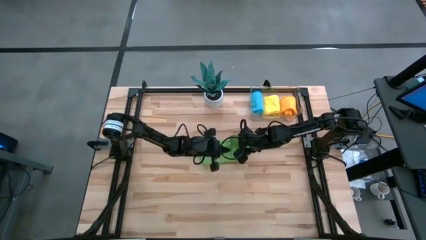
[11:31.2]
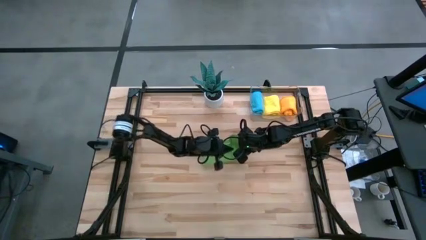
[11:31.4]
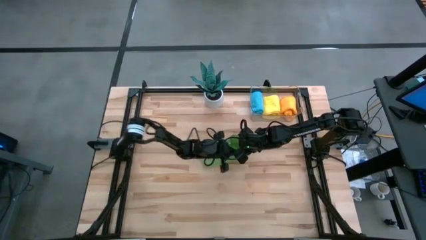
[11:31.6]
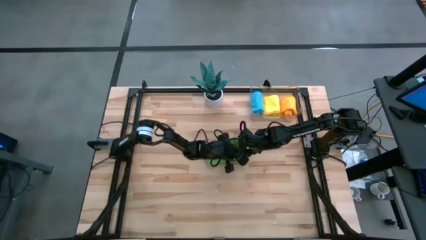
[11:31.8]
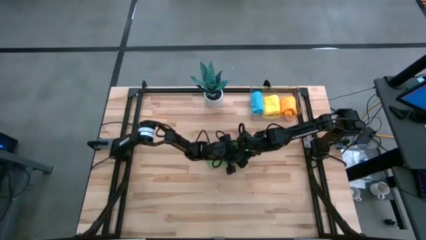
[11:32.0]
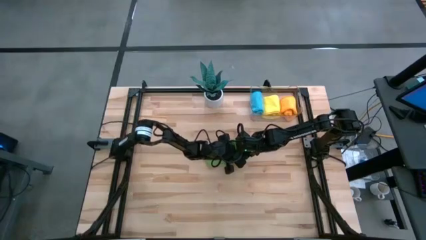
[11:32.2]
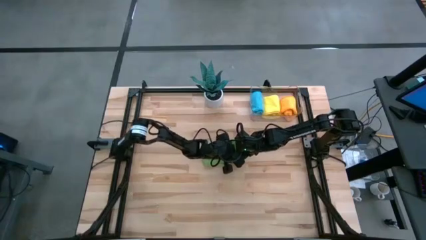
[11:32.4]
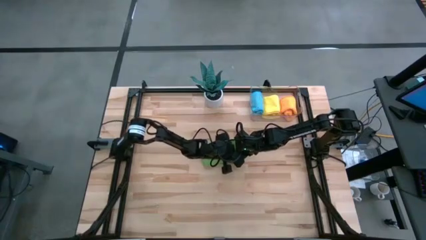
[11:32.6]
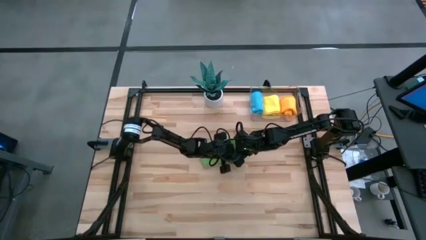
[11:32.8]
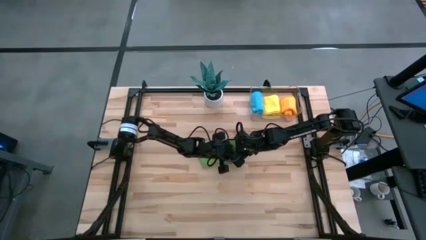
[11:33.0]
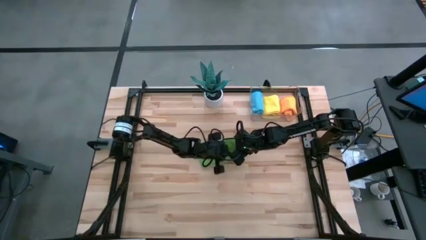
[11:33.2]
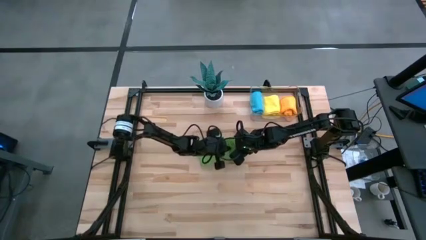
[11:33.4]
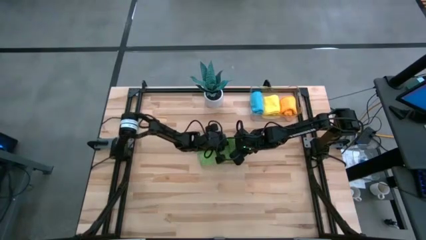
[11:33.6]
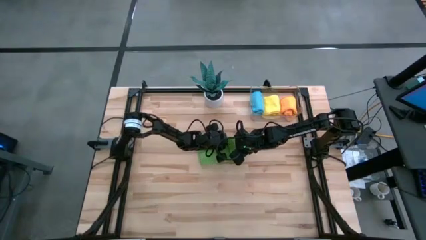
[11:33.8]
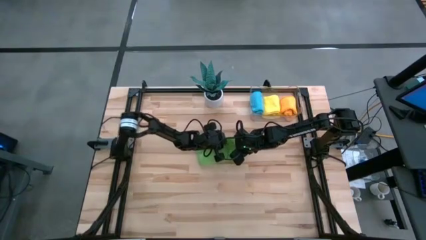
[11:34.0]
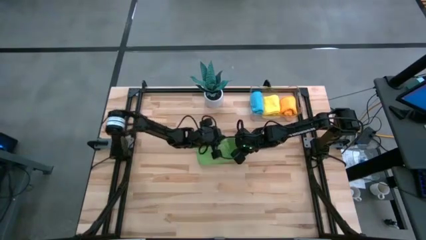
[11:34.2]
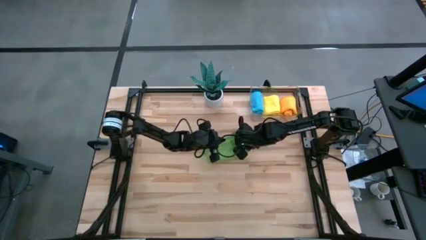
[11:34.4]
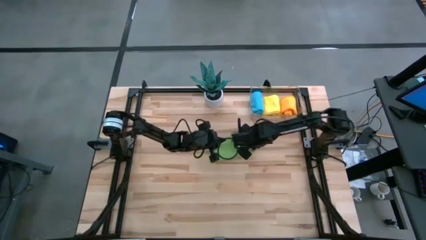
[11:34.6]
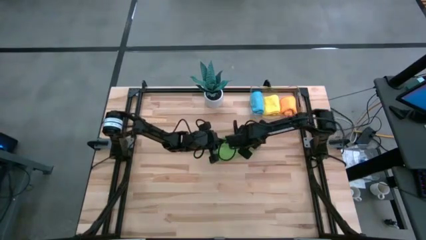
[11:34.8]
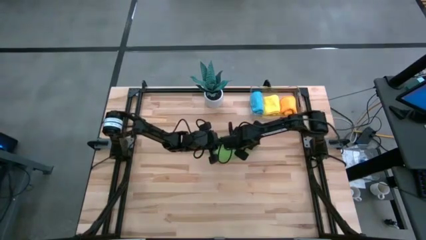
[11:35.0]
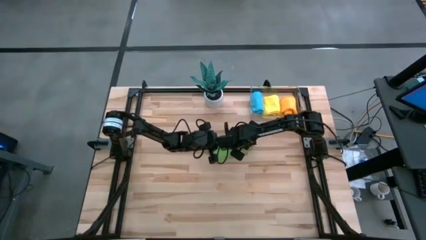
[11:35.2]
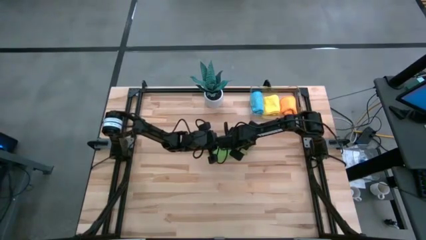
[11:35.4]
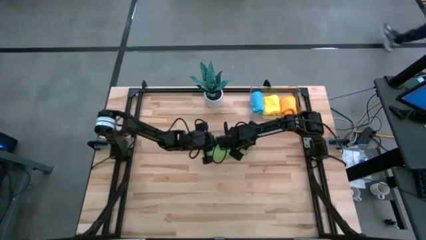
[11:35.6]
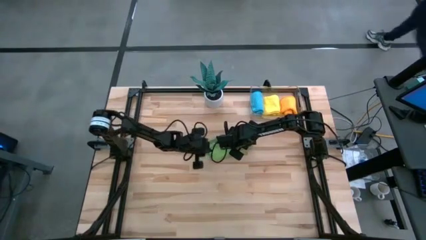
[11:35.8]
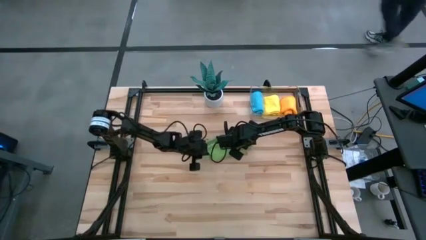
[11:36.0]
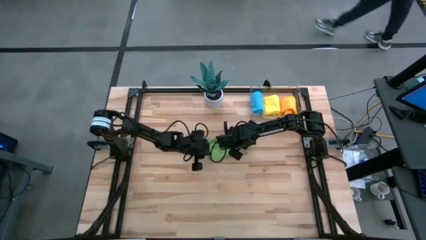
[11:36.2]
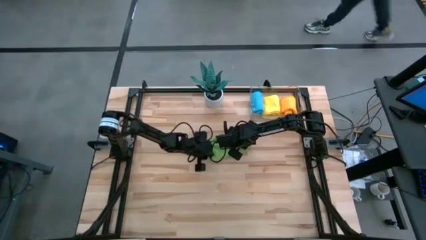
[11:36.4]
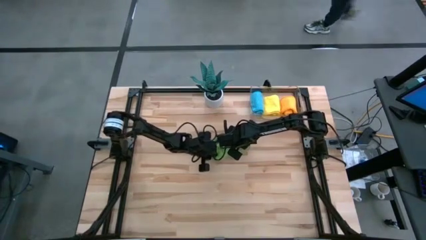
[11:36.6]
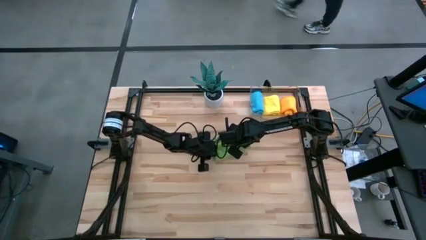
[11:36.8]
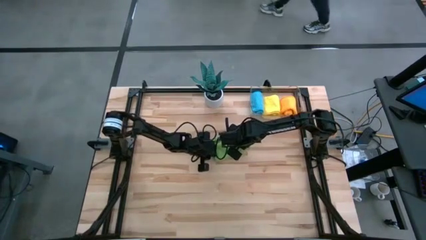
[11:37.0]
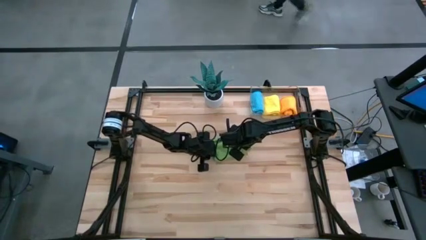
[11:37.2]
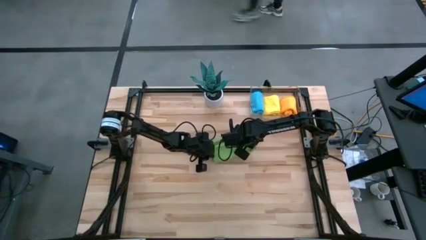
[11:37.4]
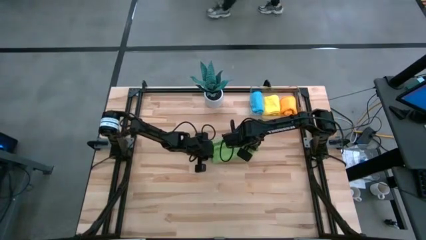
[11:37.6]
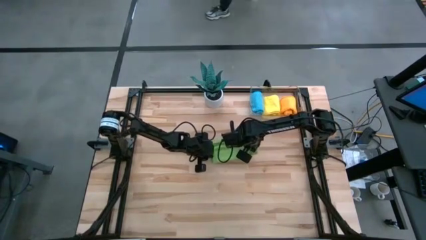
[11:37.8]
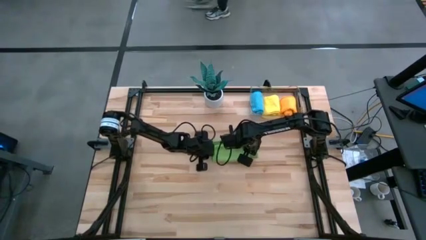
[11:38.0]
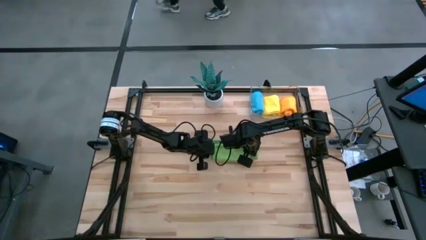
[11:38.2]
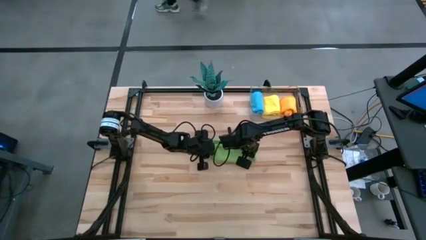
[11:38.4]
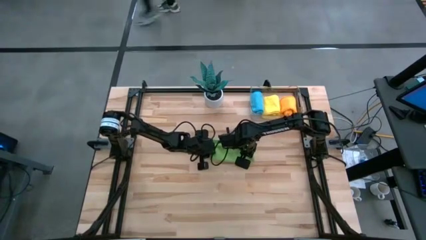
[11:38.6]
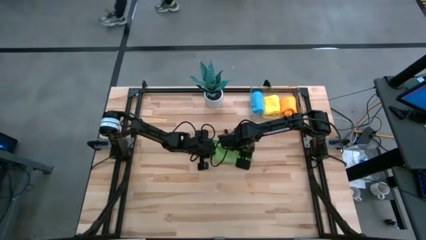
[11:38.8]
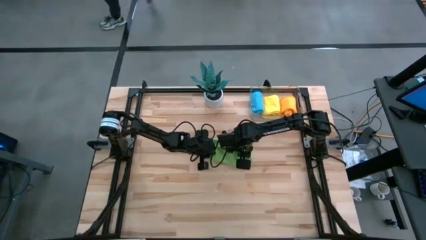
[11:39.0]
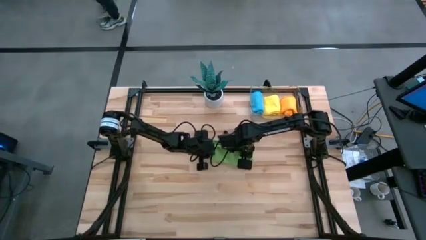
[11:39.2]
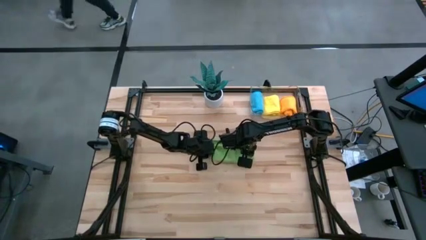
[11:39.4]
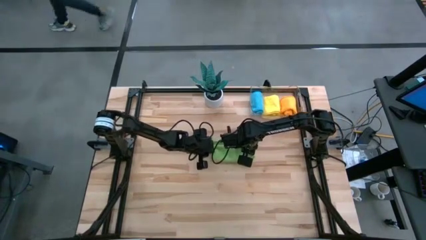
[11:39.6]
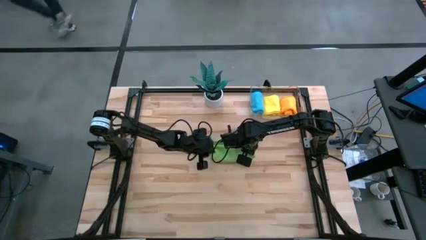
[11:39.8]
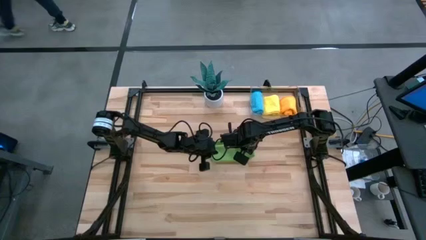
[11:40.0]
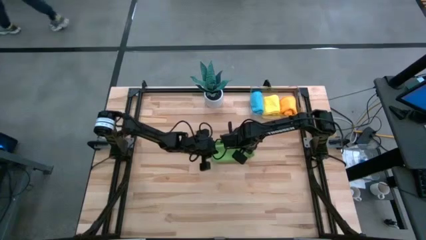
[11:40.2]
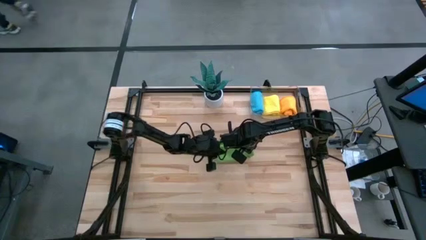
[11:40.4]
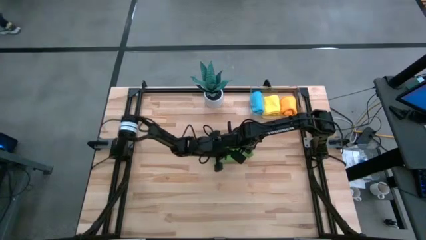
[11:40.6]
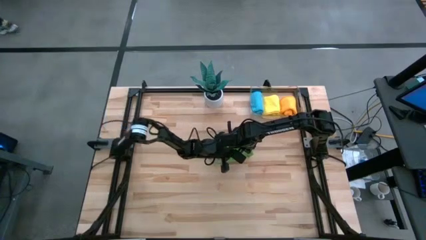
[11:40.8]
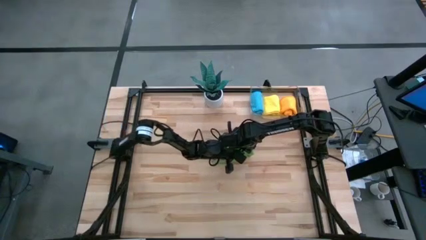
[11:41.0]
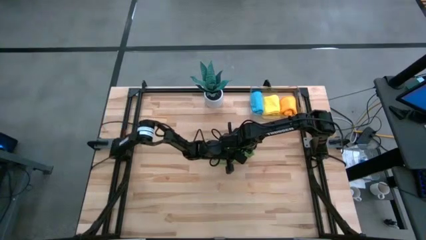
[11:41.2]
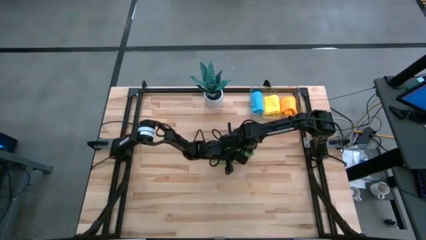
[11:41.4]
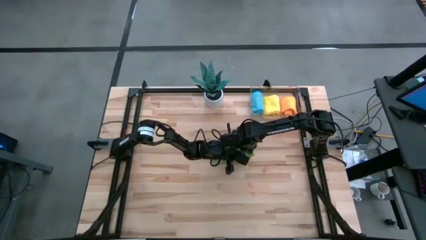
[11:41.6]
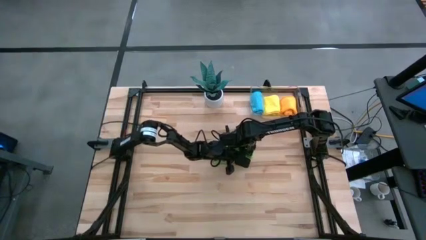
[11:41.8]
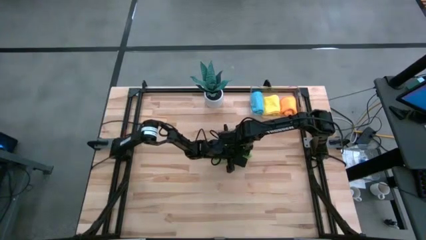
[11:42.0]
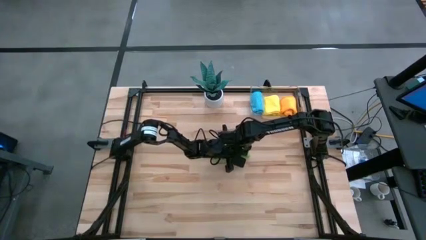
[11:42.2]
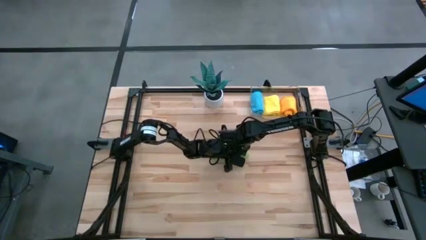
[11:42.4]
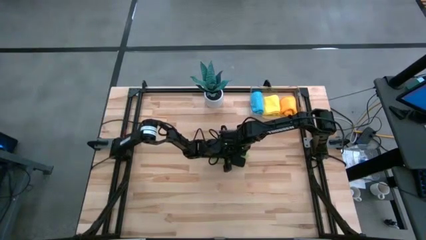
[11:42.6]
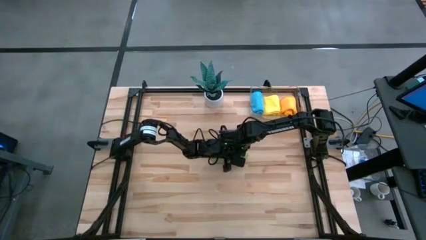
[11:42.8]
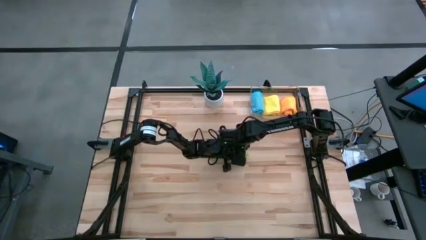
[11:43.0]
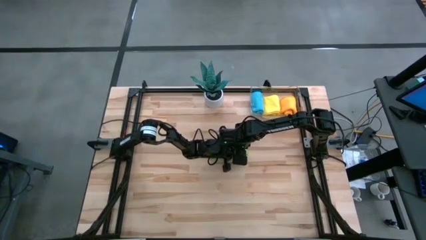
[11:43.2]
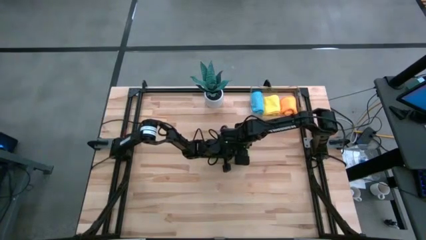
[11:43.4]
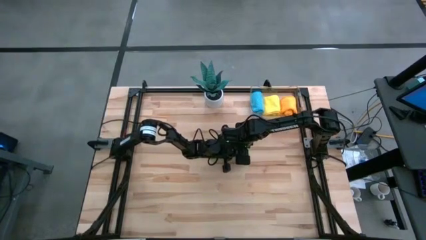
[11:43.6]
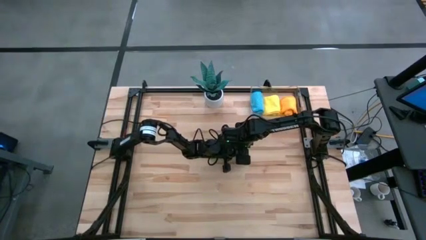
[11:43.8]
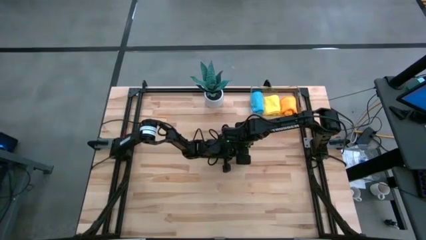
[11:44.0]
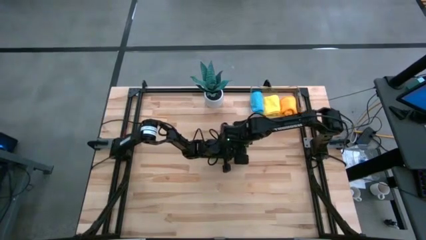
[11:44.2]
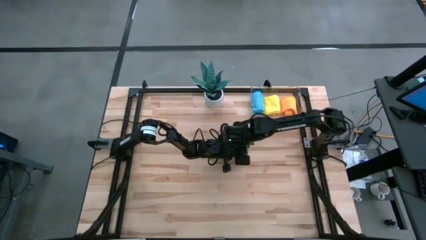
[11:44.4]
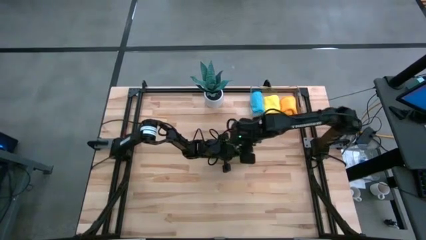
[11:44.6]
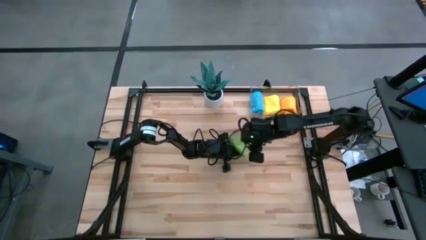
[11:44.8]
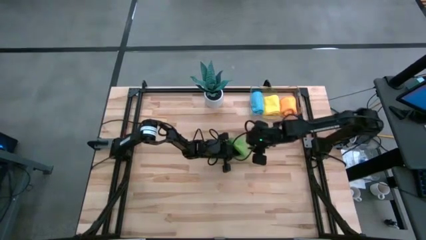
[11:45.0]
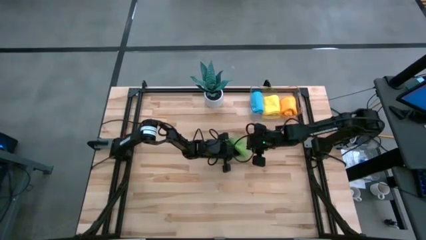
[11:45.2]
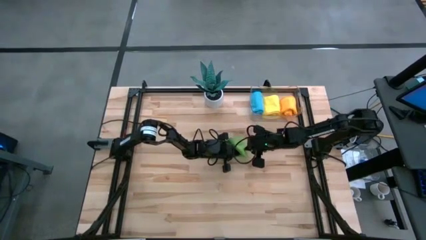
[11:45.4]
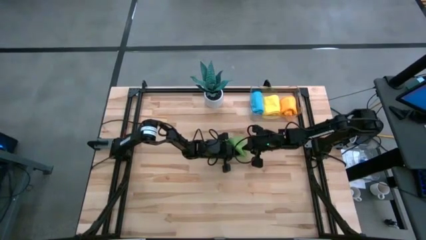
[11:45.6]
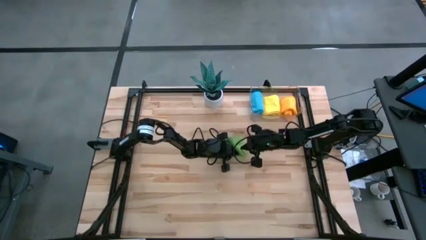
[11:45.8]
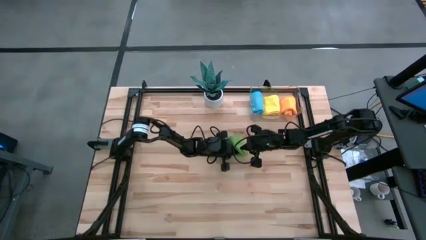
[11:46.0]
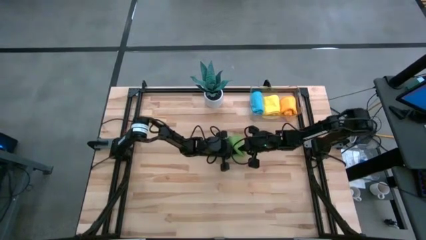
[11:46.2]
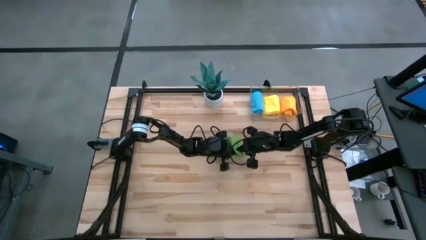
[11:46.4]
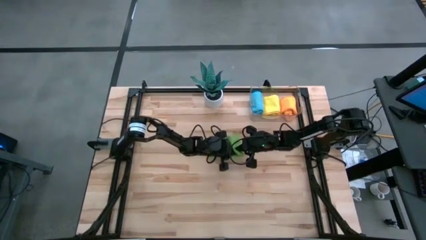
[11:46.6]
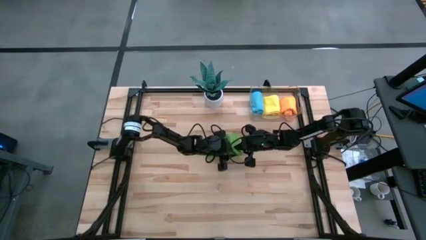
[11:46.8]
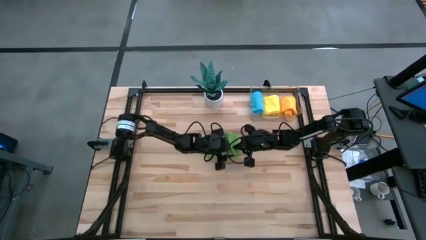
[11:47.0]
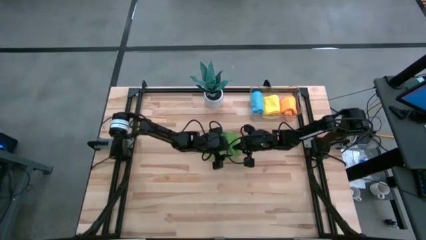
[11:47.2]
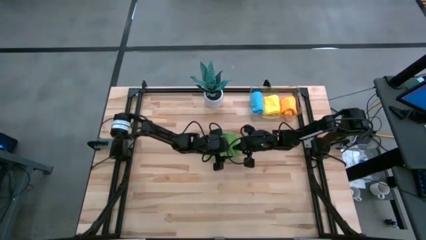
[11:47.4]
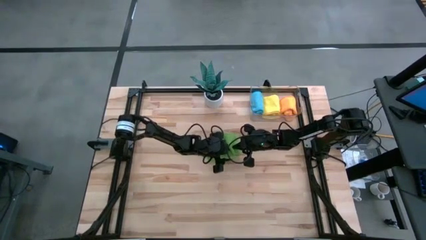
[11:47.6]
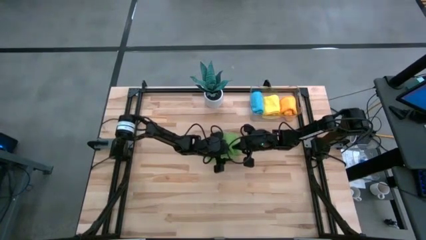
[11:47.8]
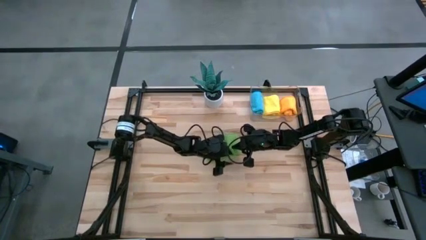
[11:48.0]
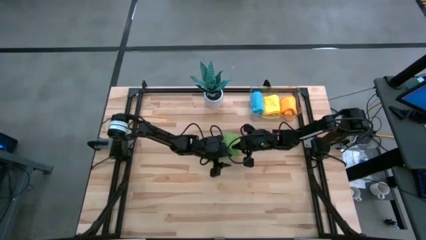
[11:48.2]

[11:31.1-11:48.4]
Task: Roll microfiber towels into tight, uniform cylinder then place into a basket
Roll the green microfiber cloth
